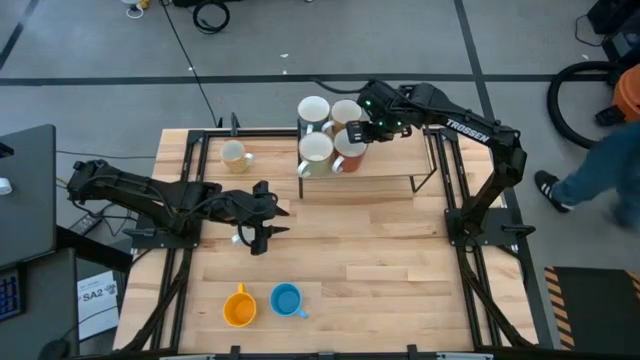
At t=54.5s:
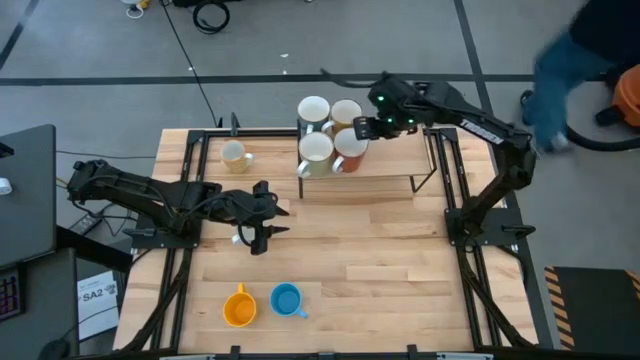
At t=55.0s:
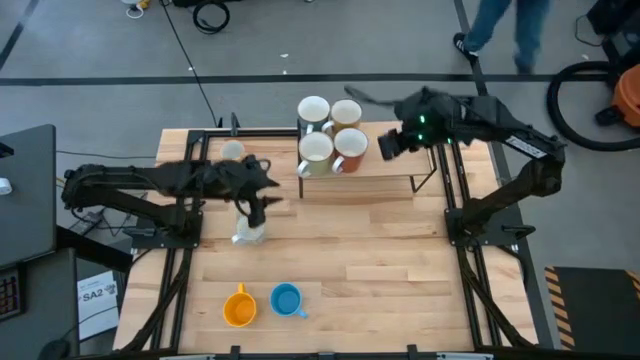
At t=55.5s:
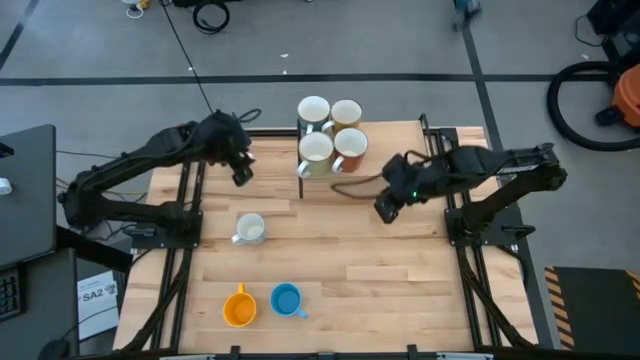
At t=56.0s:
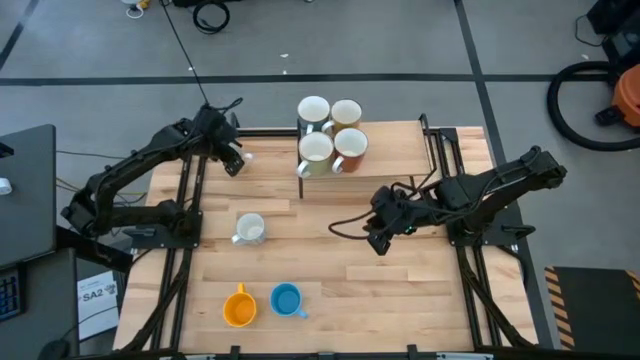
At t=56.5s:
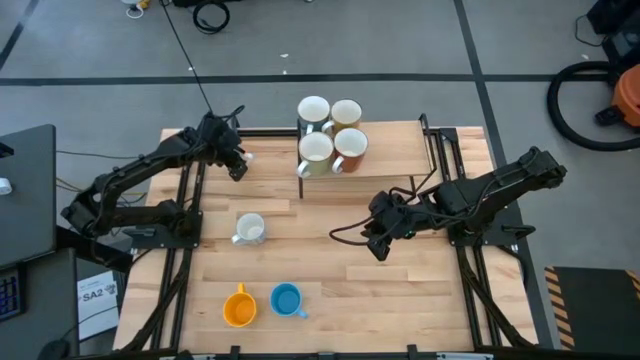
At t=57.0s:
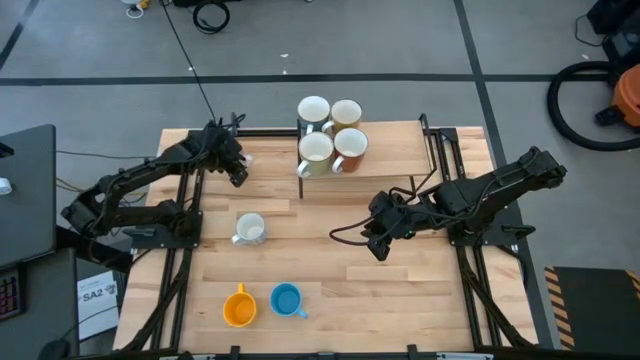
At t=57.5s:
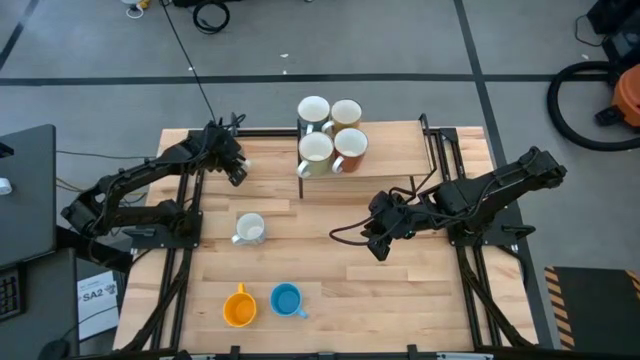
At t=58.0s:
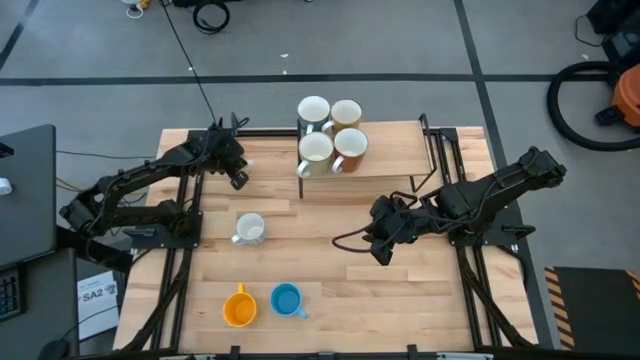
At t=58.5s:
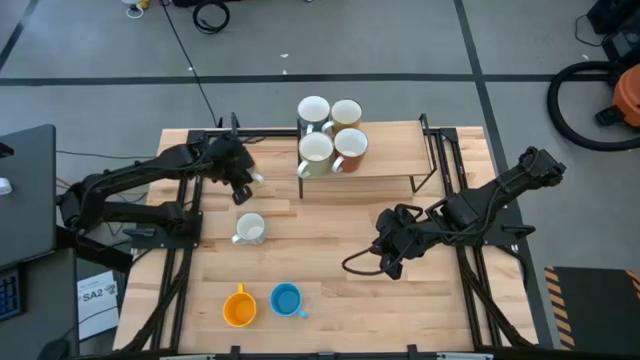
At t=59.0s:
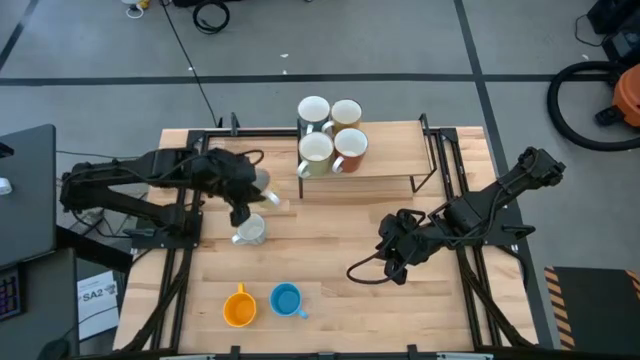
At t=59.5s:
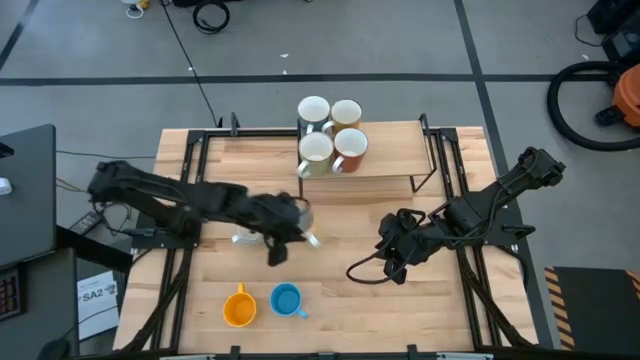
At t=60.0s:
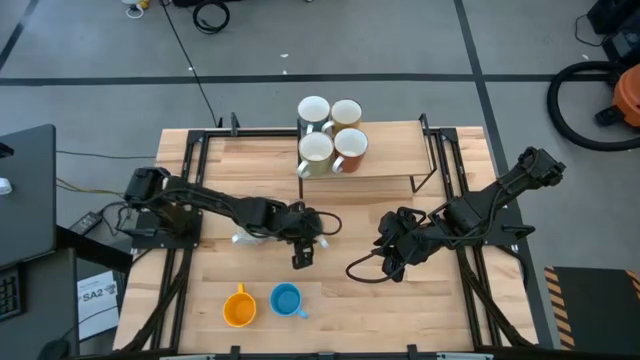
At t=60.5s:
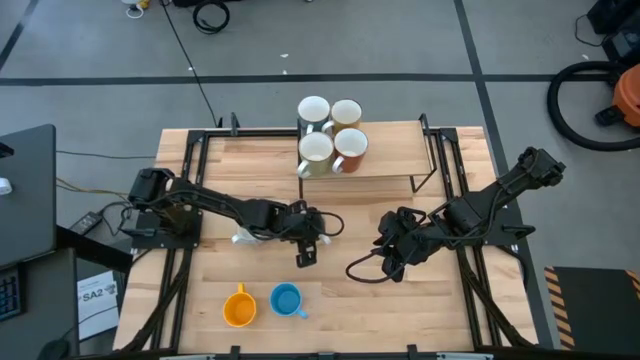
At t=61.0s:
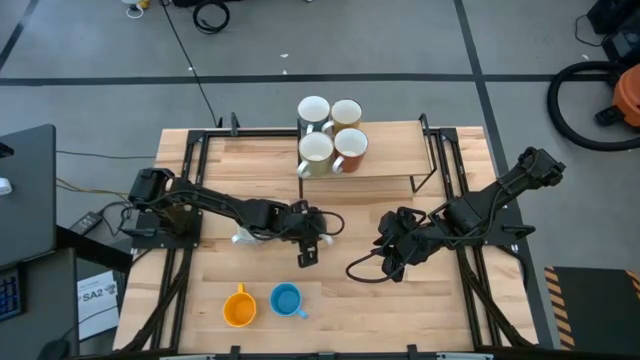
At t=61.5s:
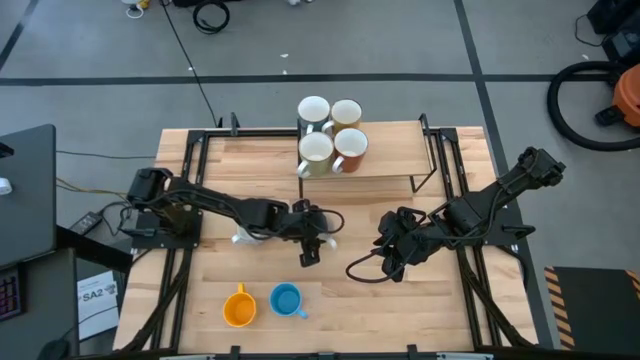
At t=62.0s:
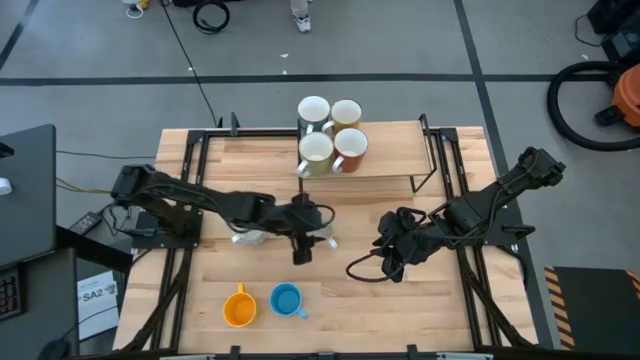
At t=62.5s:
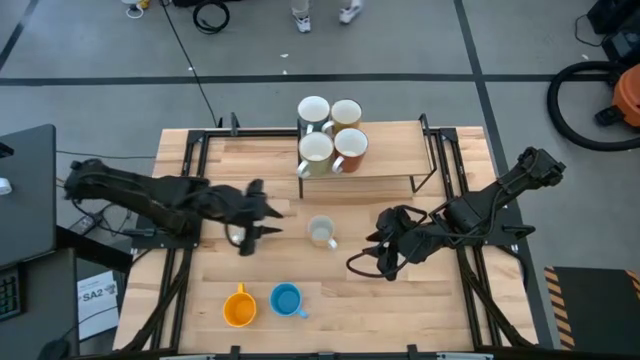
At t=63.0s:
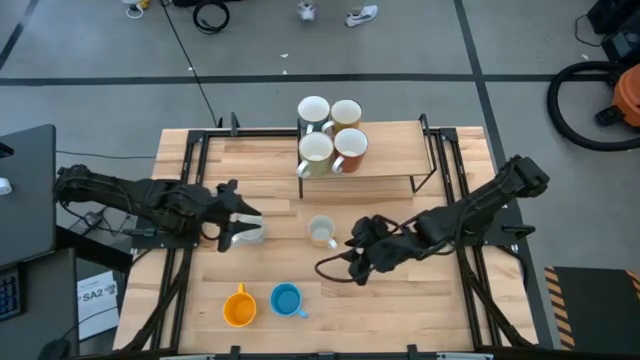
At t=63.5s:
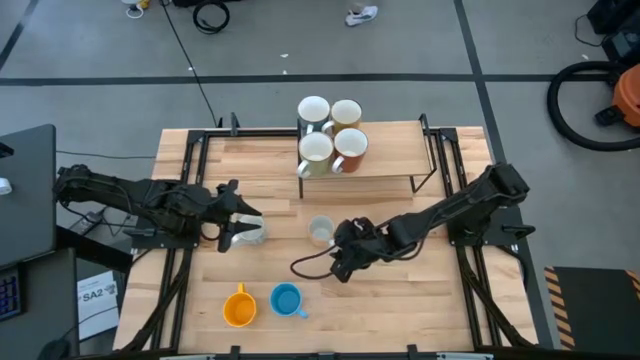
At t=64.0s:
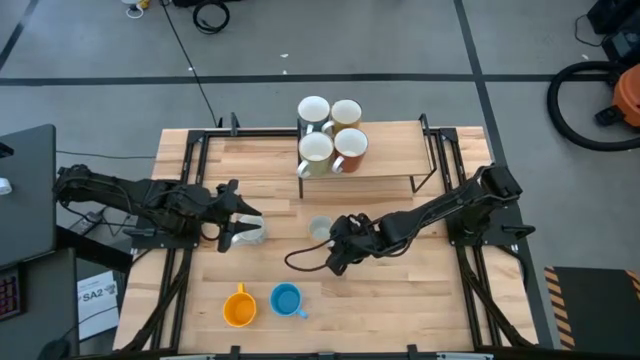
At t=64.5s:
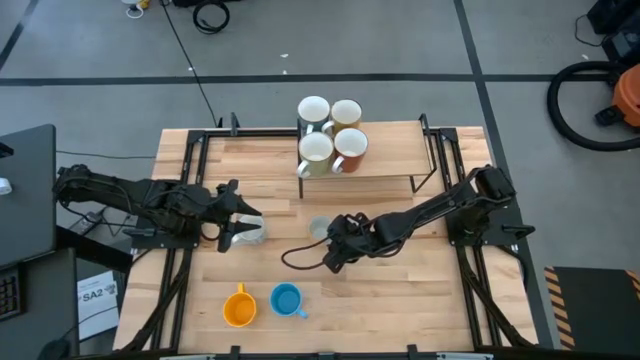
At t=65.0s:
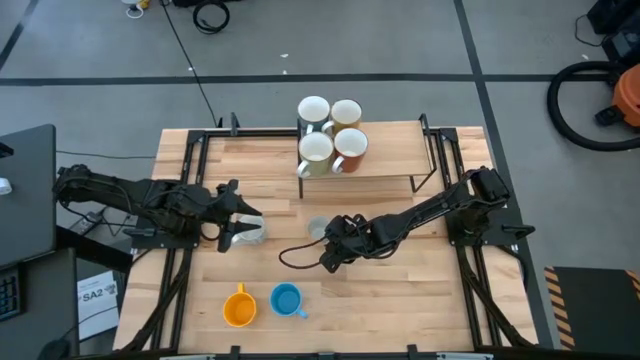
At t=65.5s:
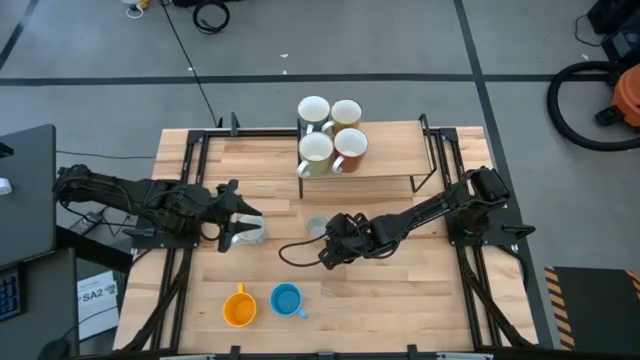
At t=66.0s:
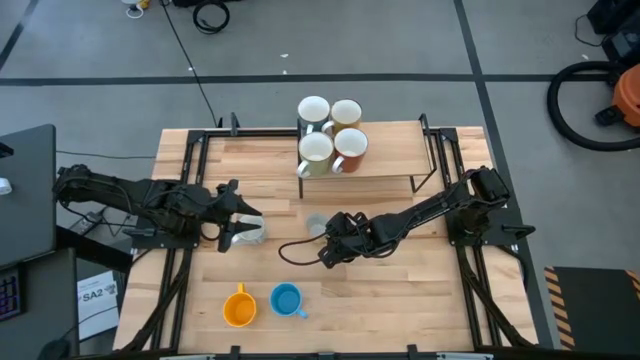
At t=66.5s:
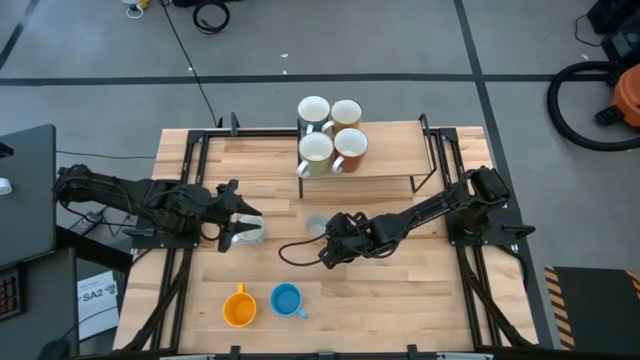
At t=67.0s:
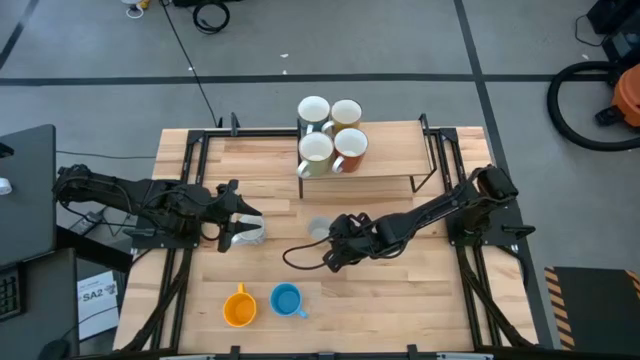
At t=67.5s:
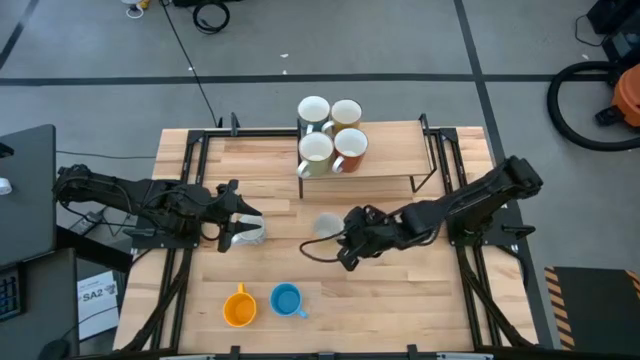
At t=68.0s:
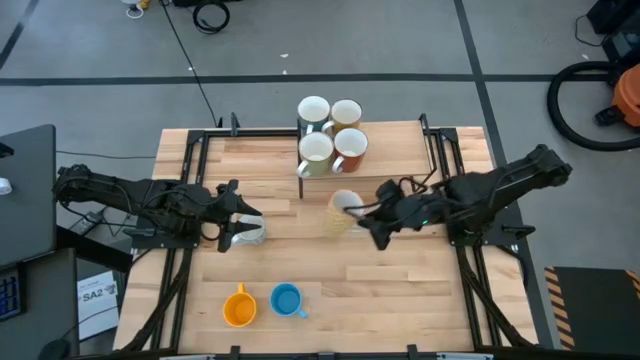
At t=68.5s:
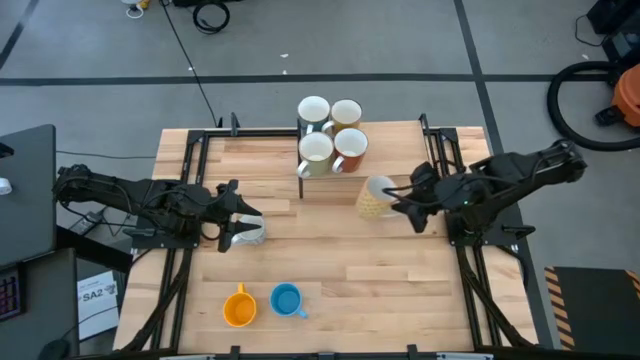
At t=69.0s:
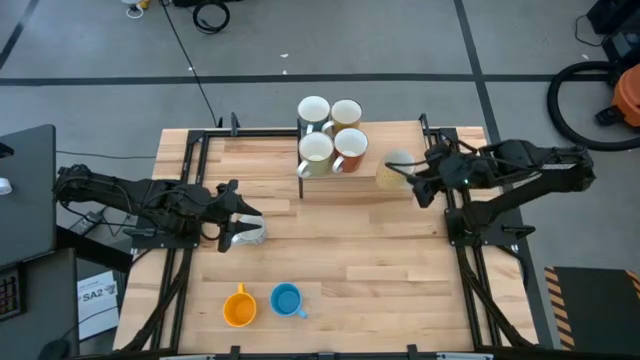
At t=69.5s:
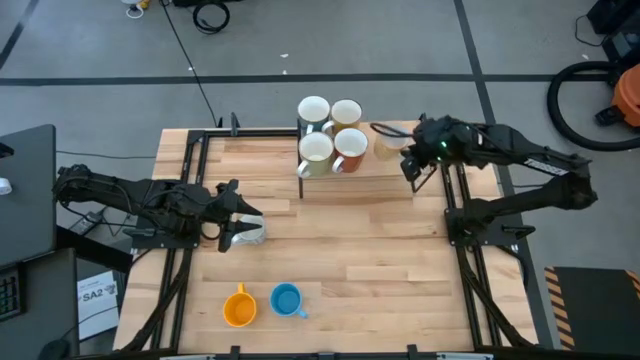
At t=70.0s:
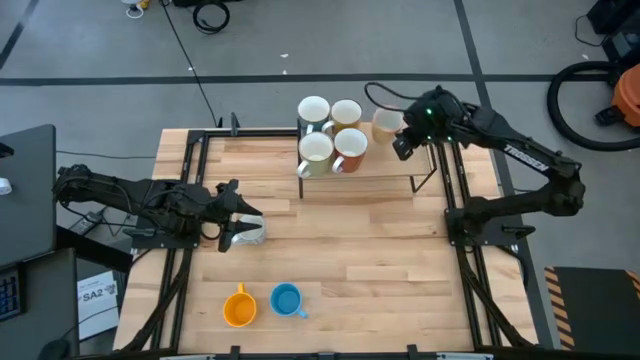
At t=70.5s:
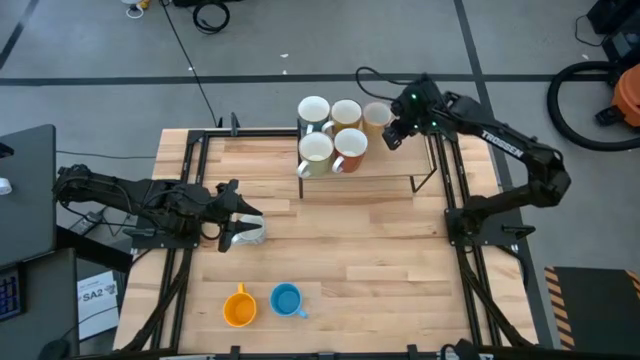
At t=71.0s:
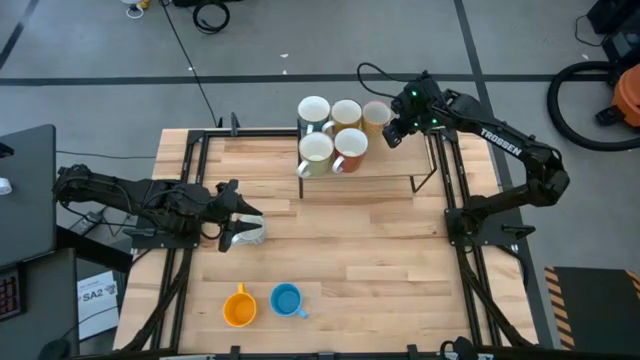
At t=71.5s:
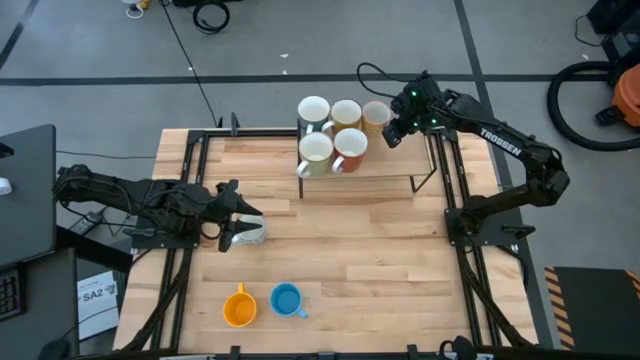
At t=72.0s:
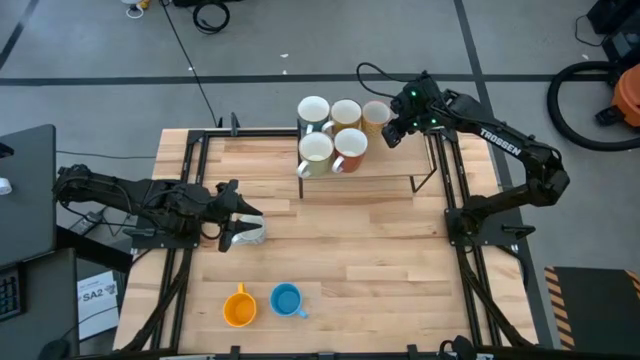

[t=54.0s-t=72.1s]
Task: Place coffee mugs
Put the yellow patterned mug on the shelf

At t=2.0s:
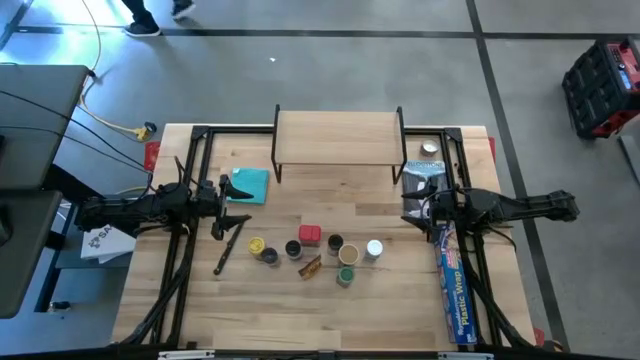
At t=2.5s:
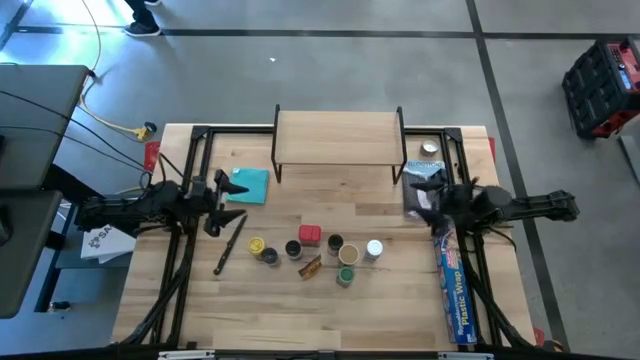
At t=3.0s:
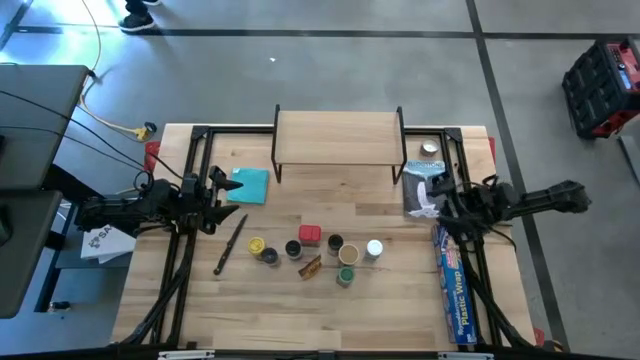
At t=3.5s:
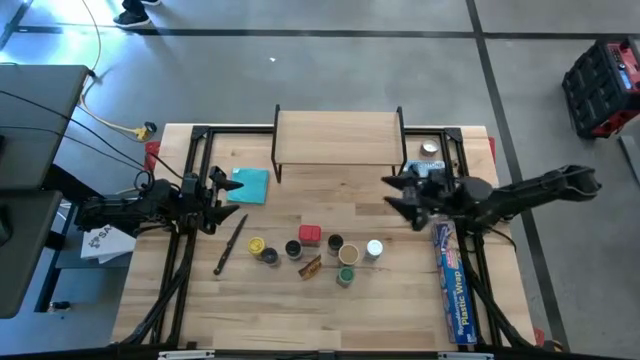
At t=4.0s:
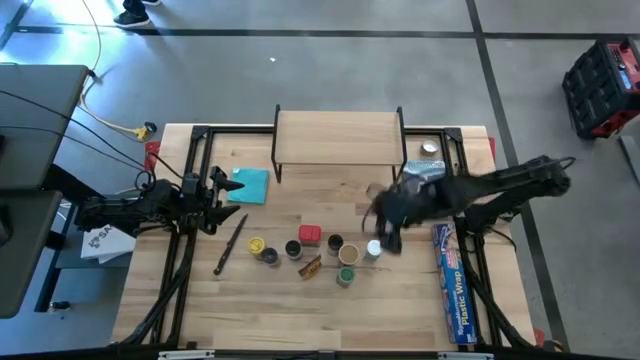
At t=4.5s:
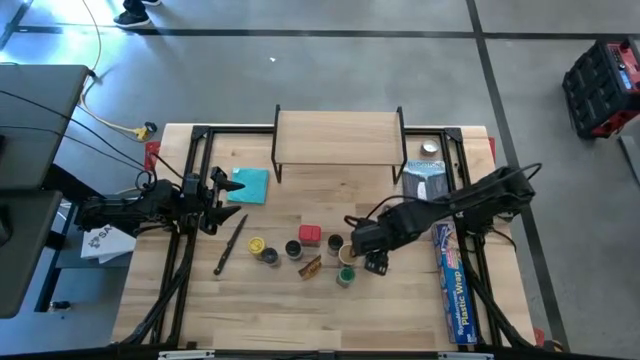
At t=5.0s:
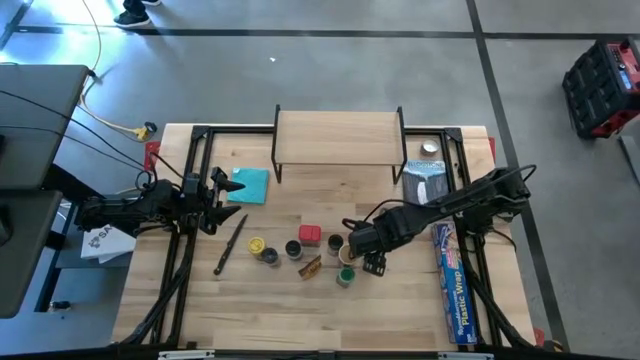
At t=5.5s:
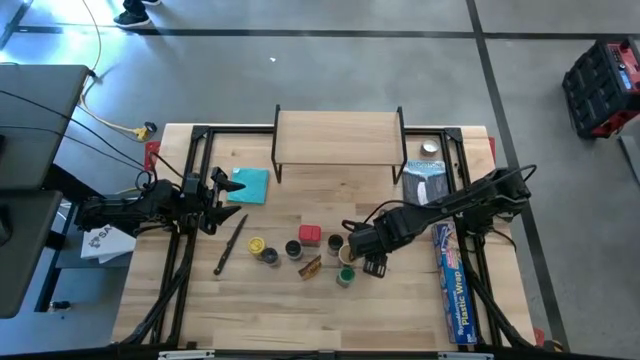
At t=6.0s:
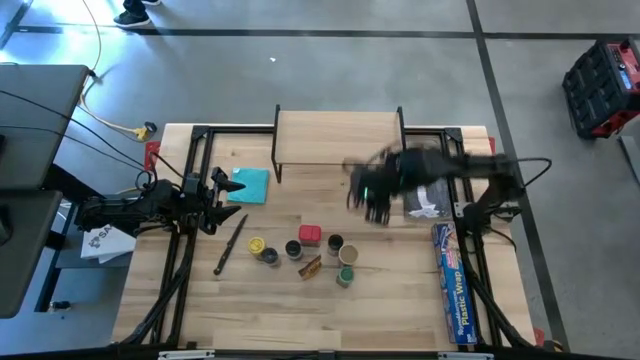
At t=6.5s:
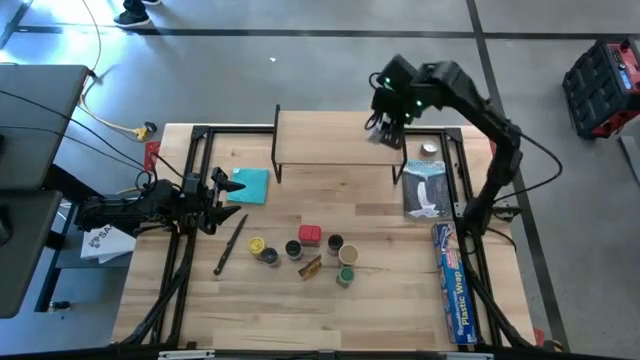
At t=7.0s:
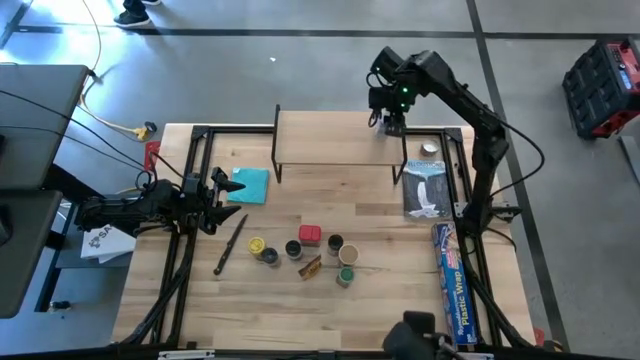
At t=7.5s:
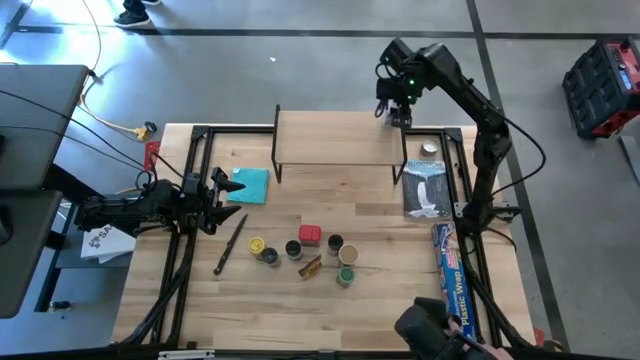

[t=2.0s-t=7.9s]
Task: Shelf spices
Put the white spice bottle on the shelf
